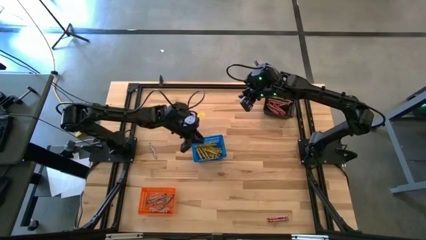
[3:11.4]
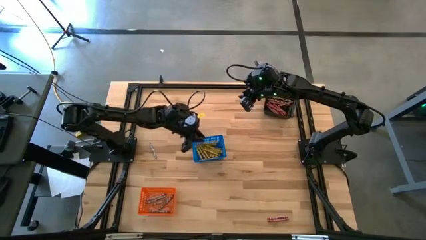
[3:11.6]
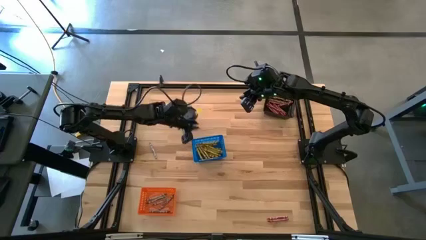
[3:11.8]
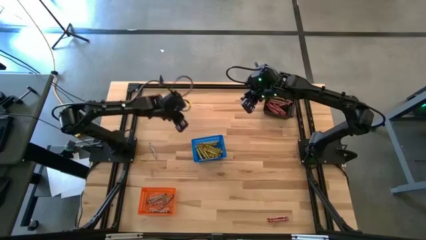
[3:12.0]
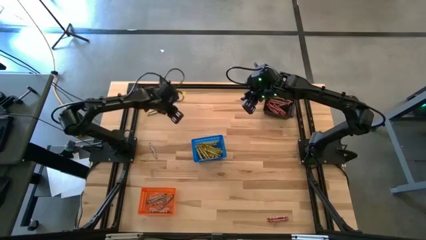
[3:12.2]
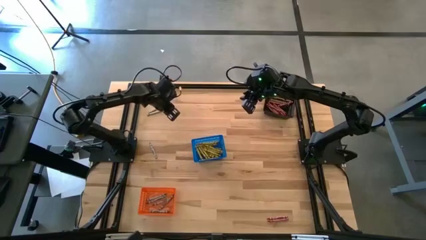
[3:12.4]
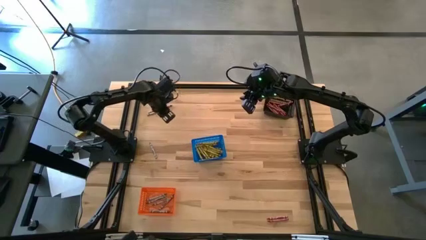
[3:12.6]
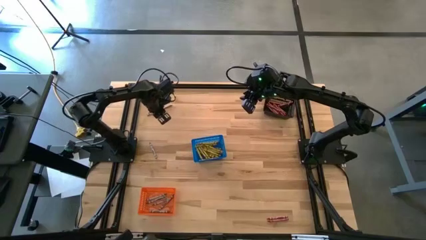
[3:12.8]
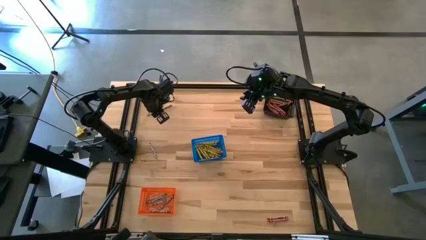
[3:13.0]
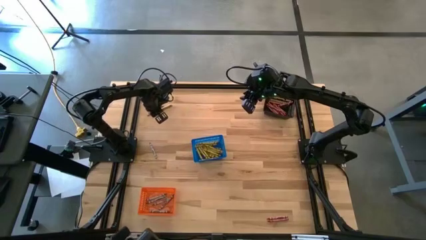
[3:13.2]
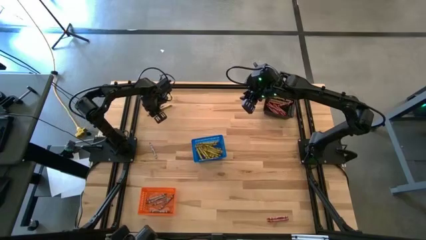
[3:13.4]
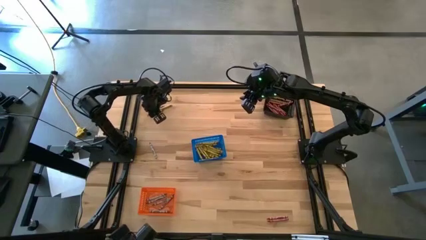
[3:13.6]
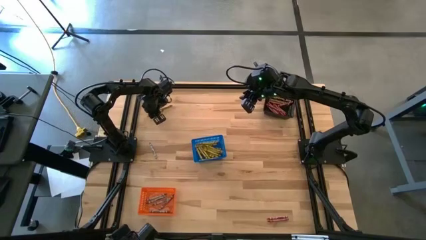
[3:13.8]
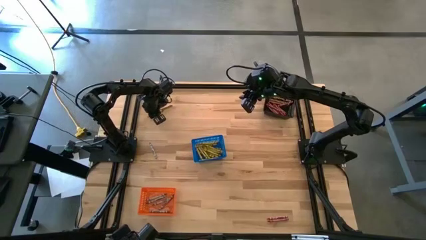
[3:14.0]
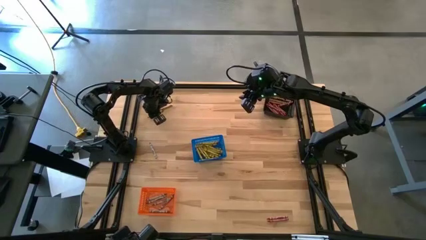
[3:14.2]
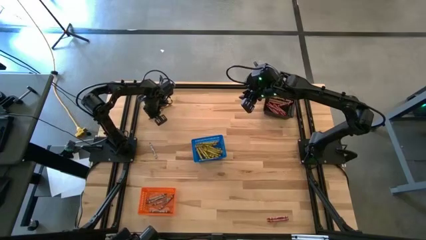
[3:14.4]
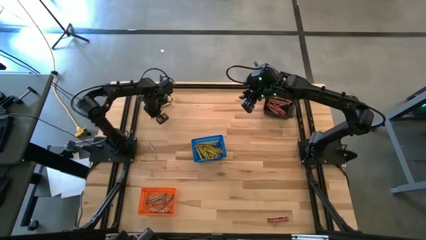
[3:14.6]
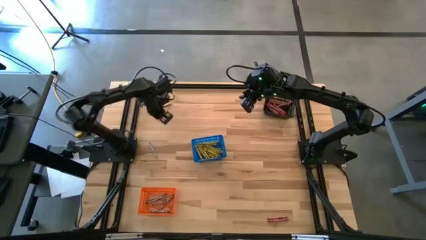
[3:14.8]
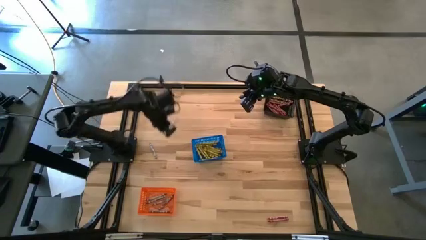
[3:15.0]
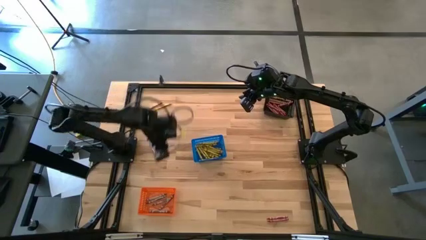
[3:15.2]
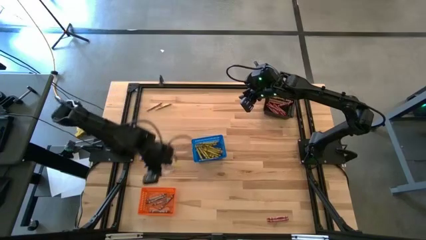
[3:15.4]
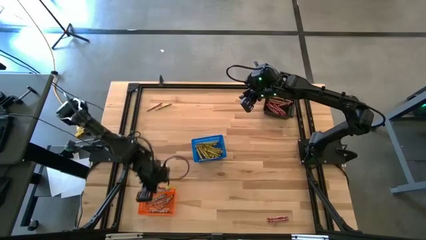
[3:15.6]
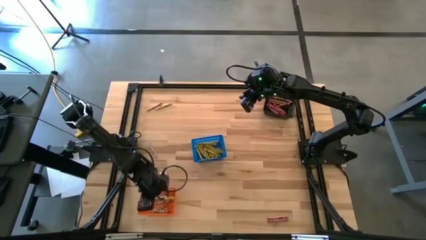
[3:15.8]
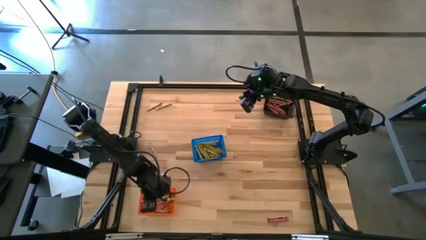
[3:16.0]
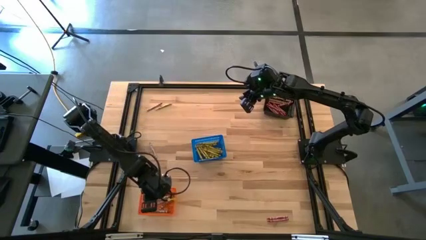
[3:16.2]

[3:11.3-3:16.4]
Task: Sort crayons
Put the gray crayon into the orange basket

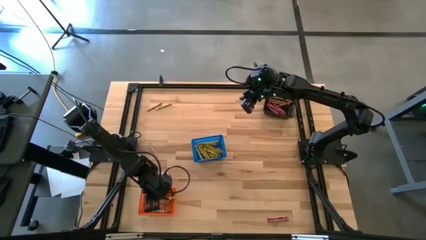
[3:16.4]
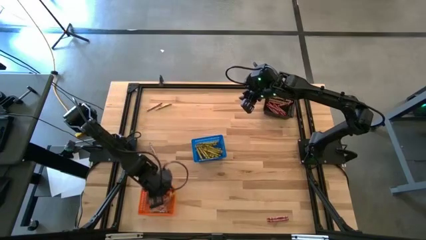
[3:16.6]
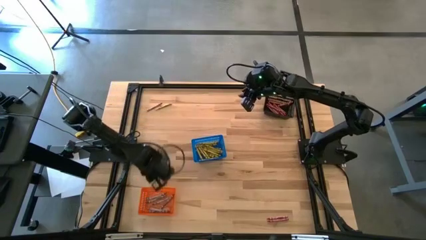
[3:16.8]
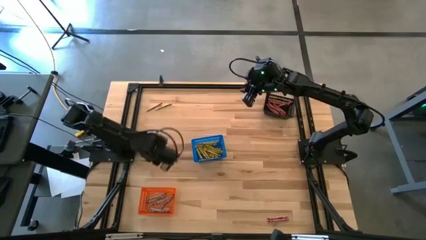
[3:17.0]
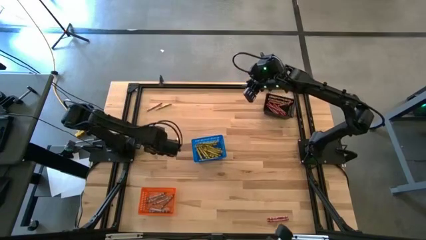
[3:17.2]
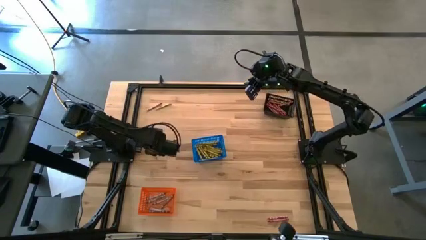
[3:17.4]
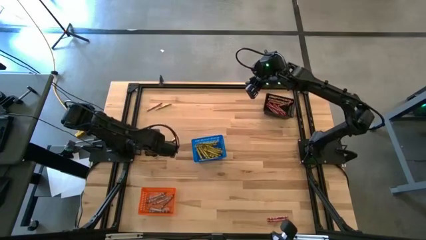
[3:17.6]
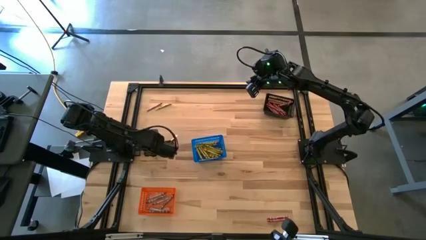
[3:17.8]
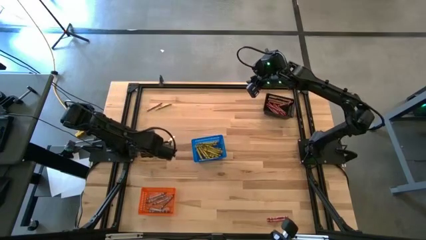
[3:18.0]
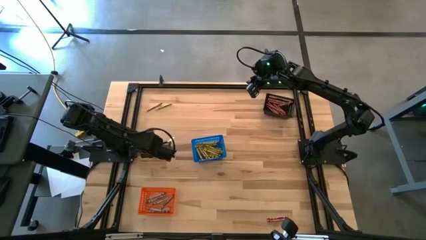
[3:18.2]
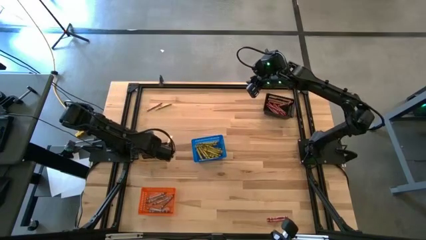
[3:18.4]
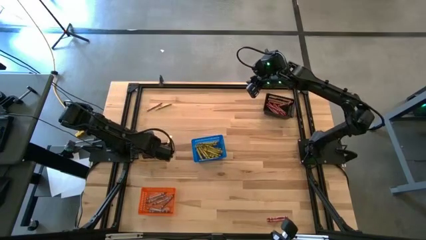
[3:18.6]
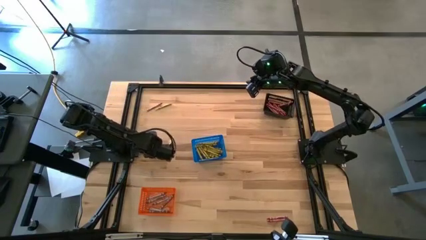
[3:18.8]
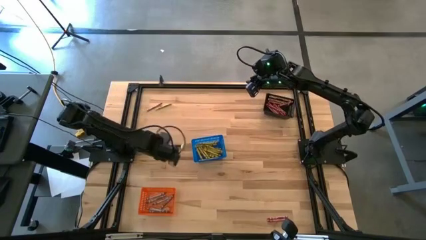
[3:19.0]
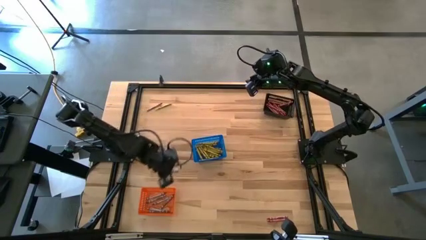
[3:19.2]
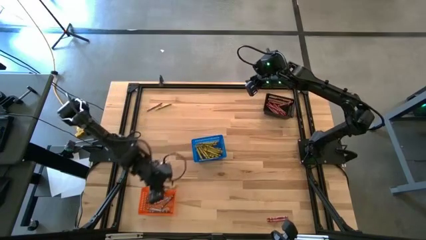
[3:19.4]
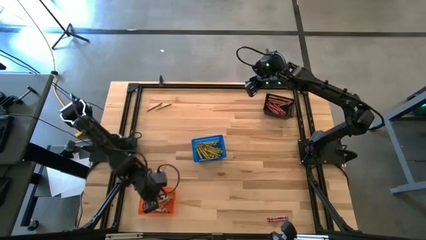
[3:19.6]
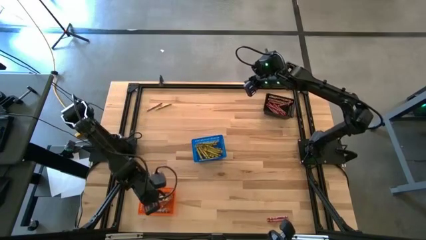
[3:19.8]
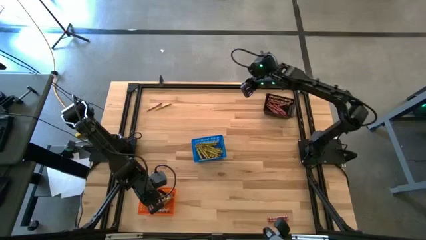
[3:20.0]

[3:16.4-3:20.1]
Put the gray crayon into the orange basket

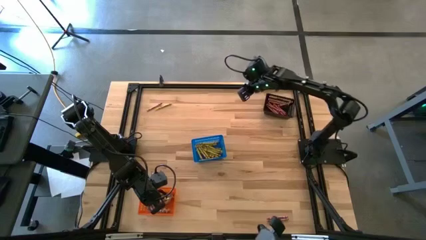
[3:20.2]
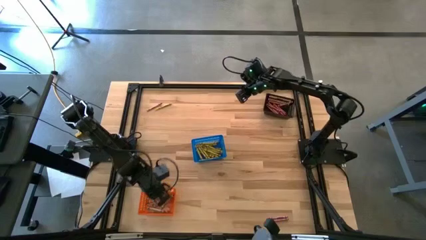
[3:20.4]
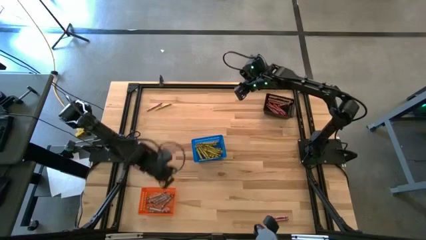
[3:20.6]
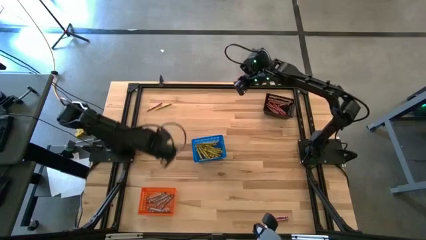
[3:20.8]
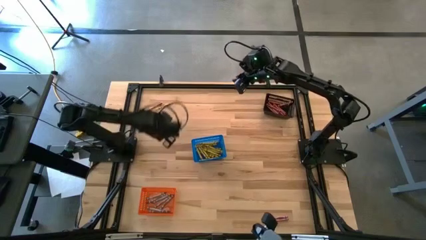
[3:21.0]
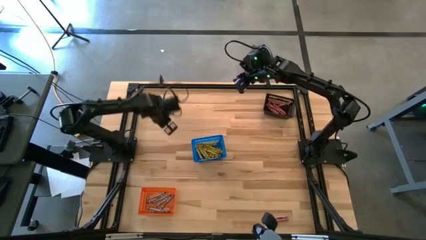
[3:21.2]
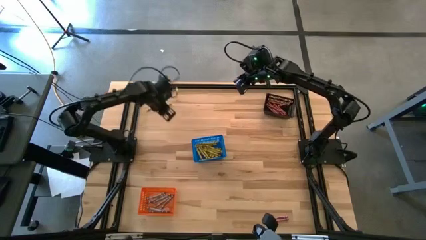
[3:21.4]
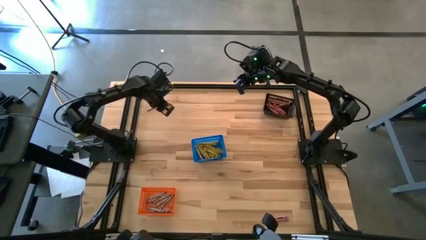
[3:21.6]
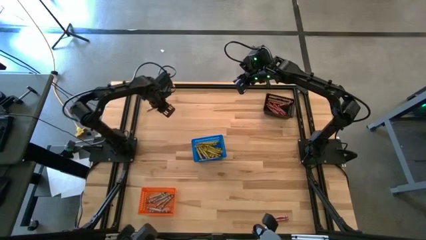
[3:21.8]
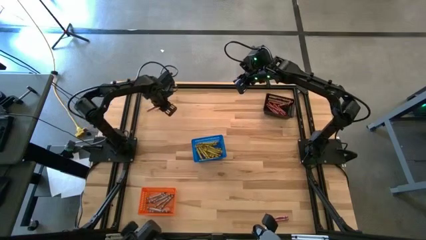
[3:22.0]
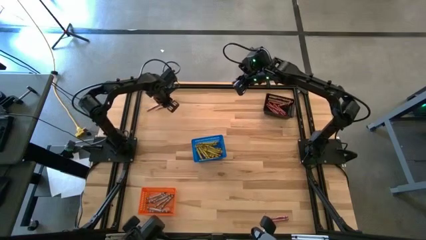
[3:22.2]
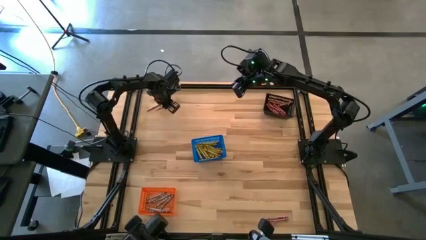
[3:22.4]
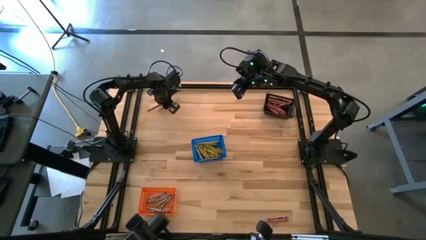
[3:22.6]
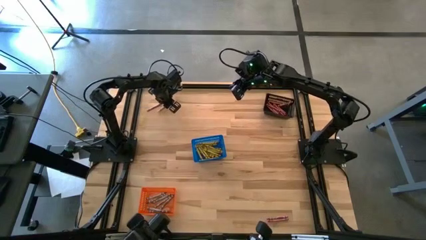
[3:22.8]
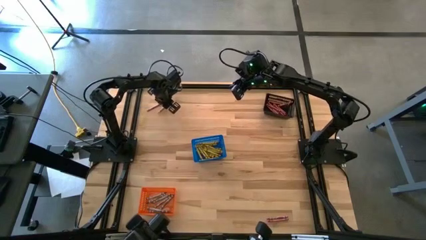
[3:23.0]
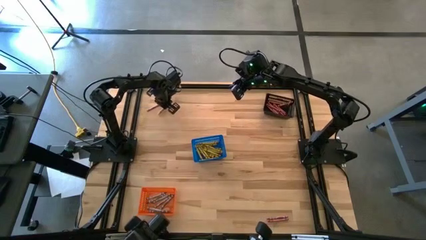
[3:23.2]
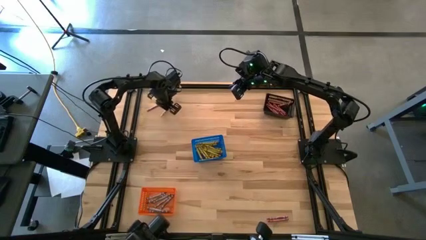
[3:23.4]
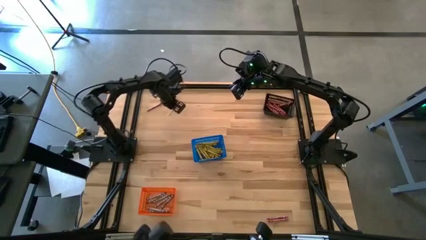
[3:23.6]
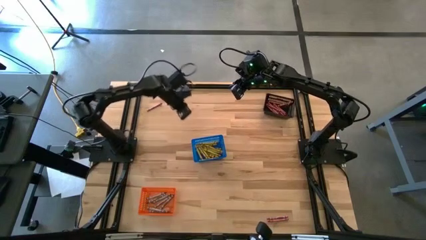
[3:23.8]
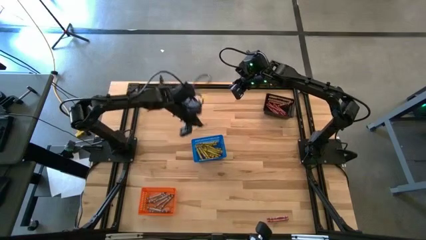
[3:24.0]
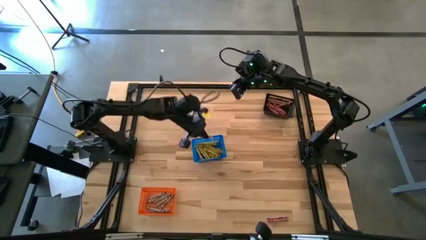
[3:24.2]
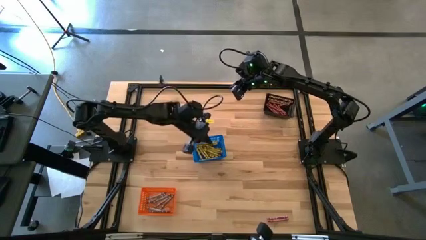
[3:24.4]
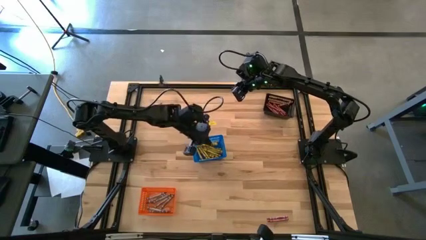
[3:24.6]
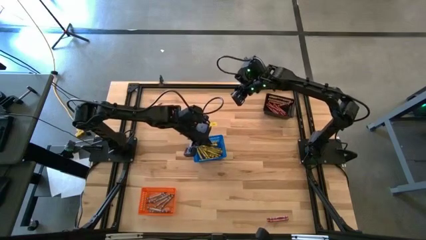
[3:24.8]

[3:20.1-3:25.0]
Put the yellow crayon into the blue basket

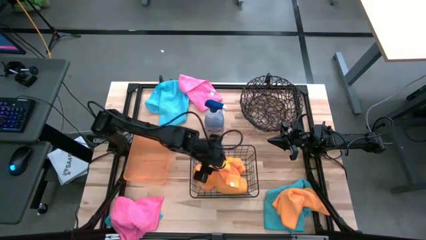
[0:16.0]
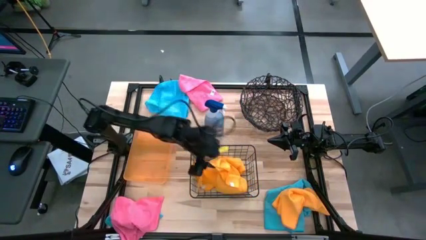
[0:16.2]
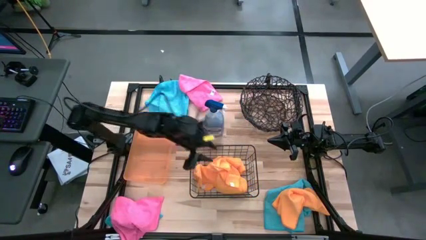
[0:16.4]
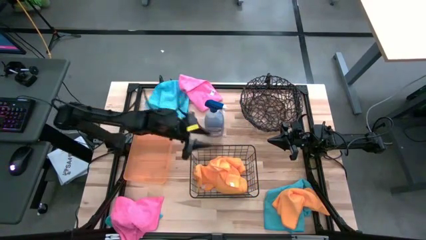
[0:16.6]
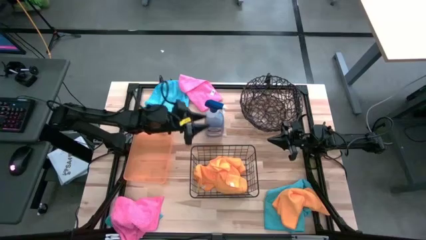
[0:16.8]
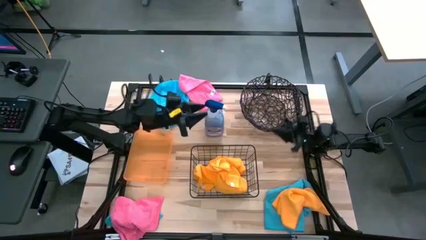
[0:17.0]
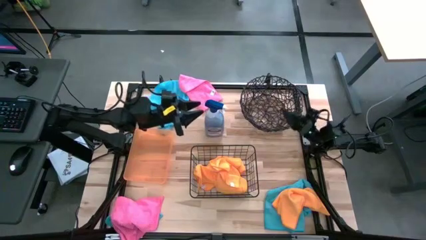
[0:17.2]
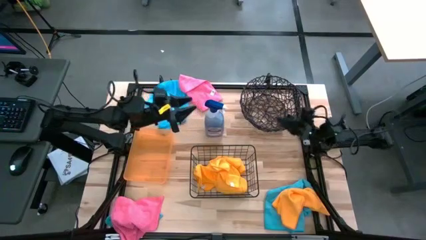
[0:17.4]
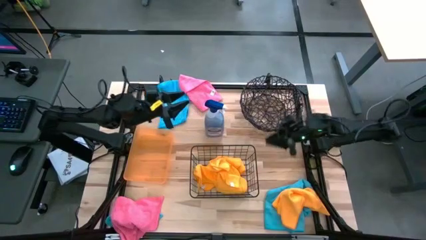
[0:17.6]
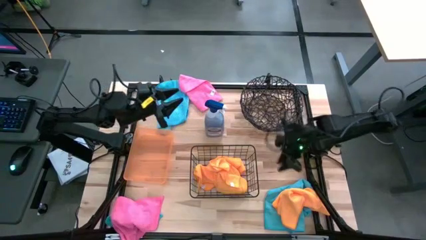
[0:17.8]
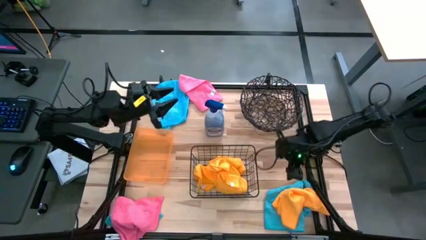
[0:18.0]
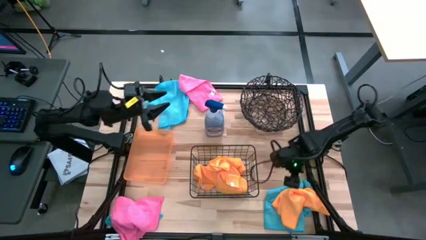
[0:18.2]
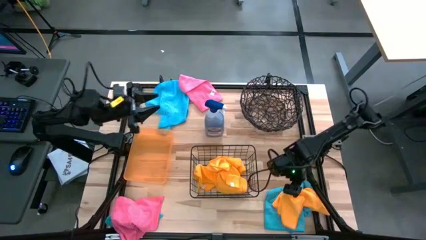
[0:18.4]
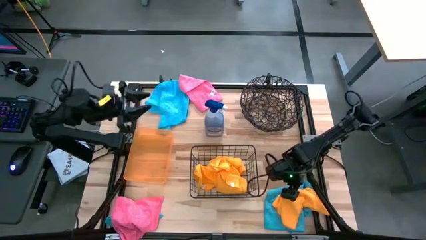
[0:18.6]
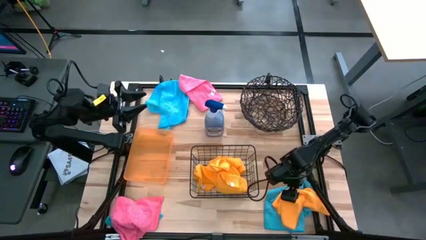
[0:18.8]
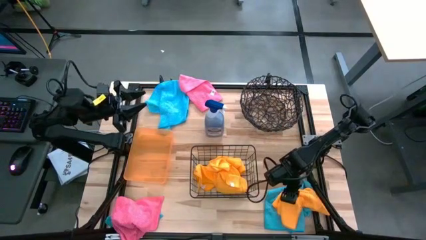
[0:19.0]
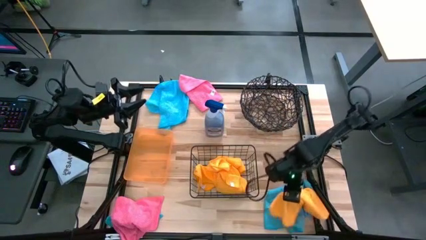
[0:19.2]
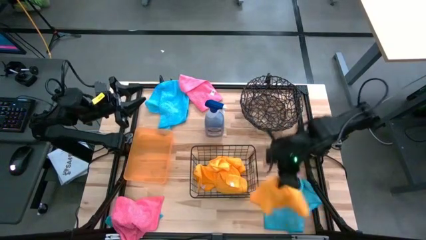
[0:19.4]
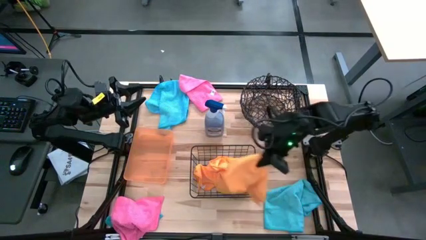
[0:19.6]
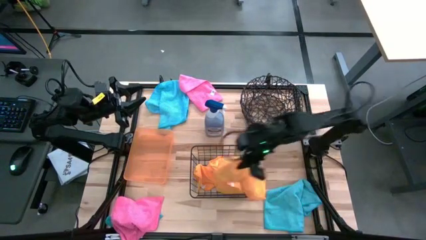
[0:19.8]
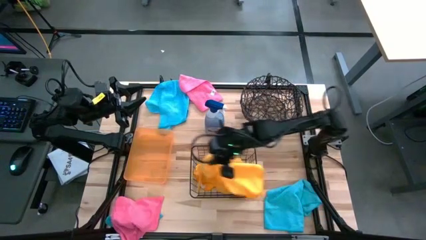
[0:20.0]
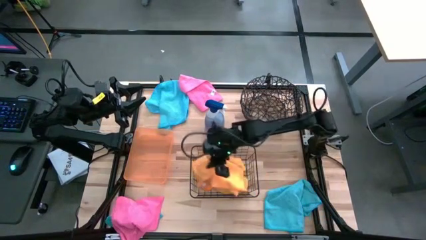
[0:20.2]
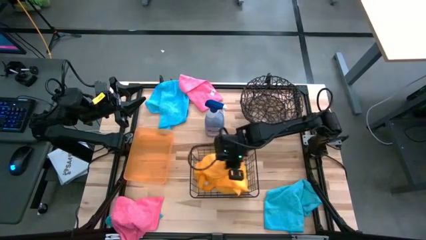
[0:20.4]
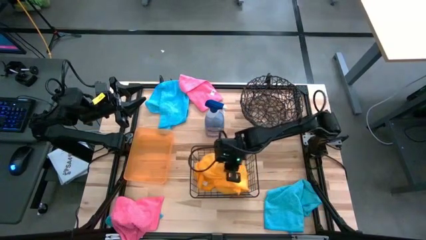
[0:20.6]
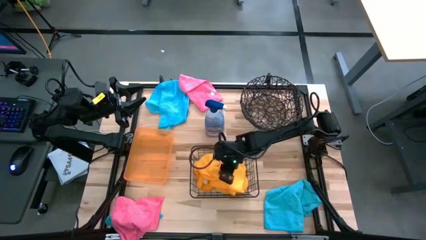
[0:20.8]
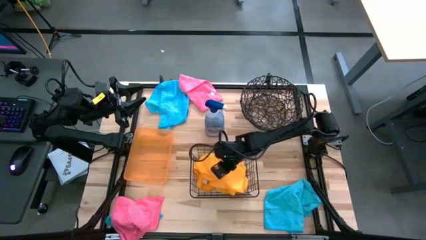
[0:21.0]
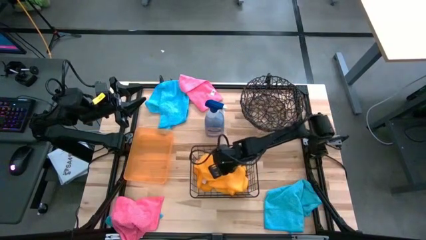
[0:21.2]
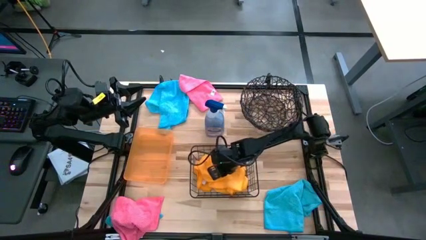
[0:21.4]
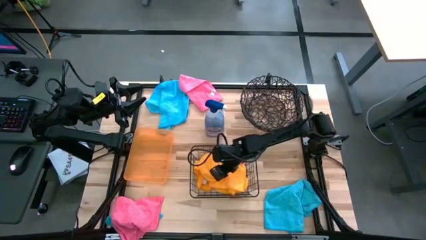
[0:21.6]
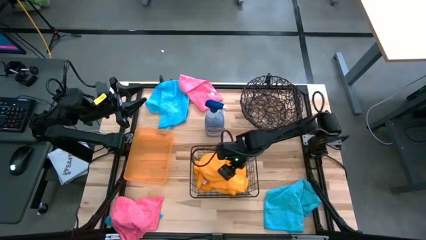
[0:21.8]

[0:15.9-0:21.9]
Task: Sort microfiber towel by color & place in baskets
Put the yellow microfiber towel into the wire basket
